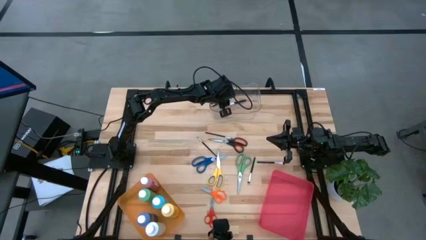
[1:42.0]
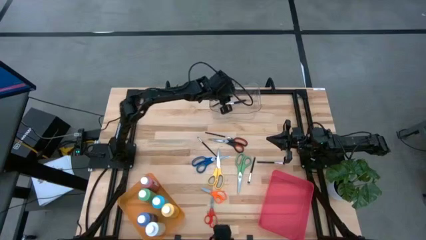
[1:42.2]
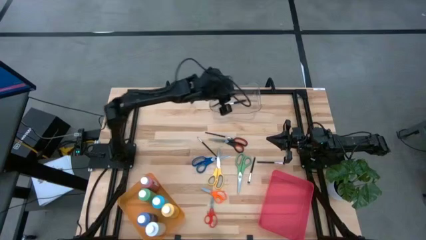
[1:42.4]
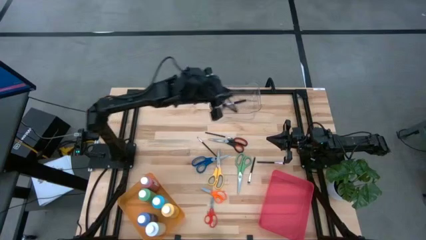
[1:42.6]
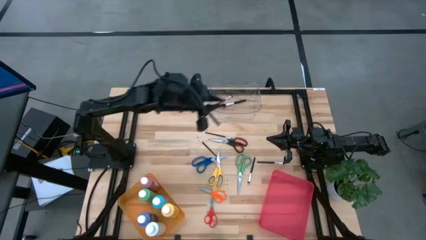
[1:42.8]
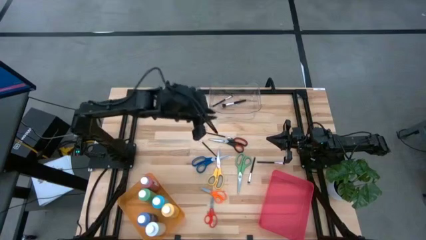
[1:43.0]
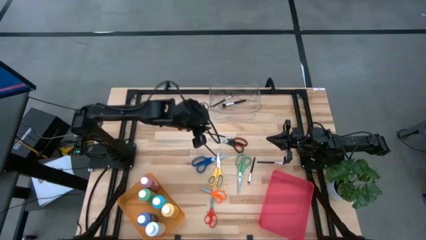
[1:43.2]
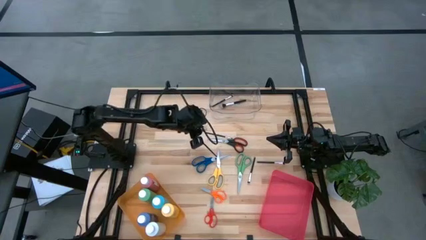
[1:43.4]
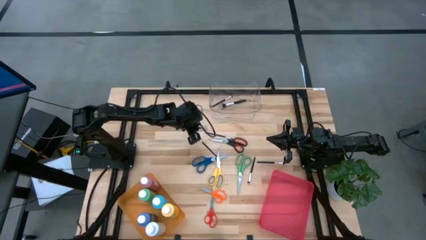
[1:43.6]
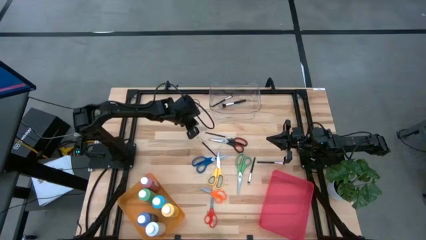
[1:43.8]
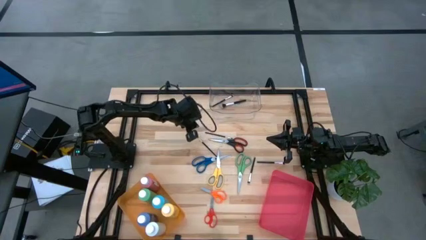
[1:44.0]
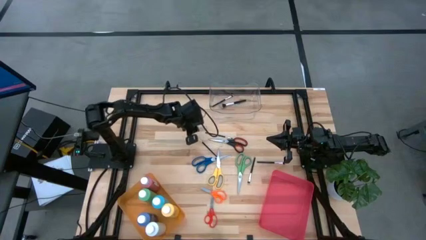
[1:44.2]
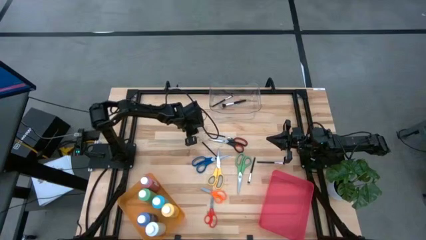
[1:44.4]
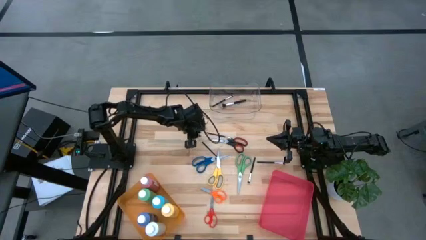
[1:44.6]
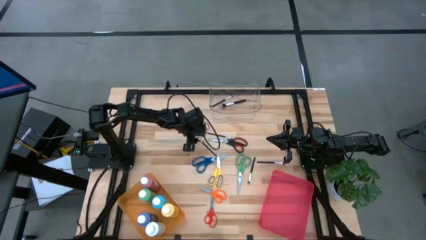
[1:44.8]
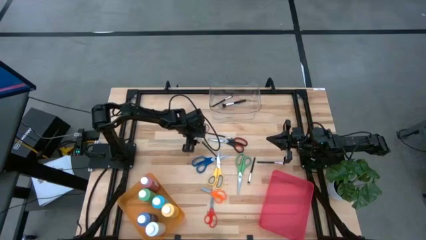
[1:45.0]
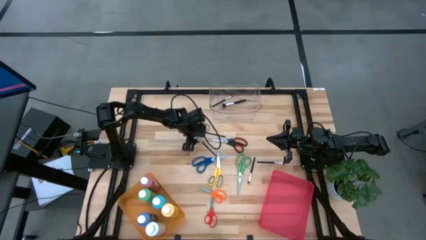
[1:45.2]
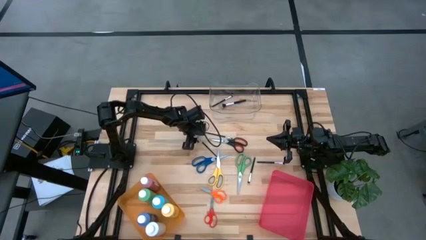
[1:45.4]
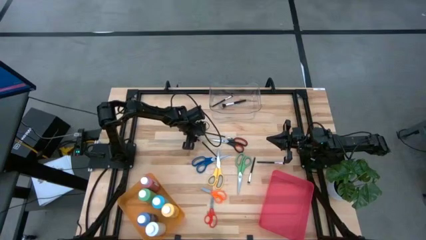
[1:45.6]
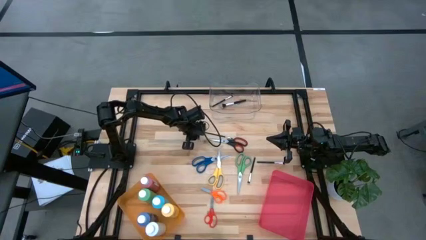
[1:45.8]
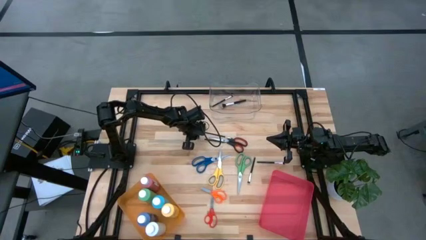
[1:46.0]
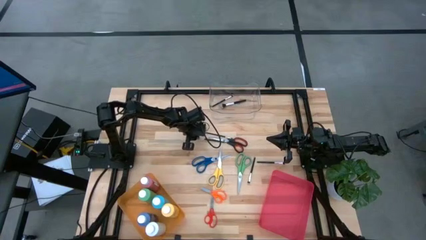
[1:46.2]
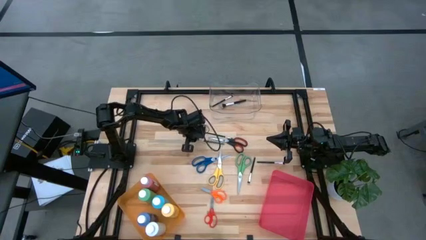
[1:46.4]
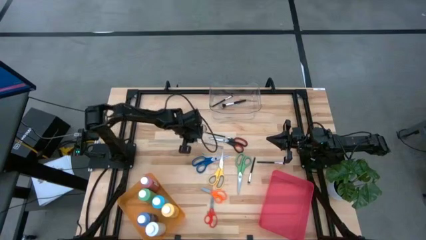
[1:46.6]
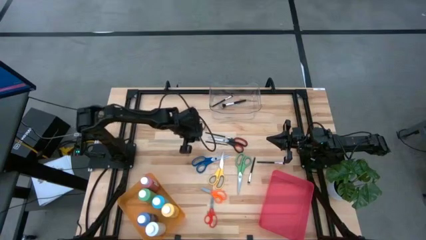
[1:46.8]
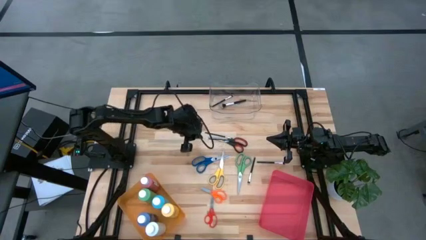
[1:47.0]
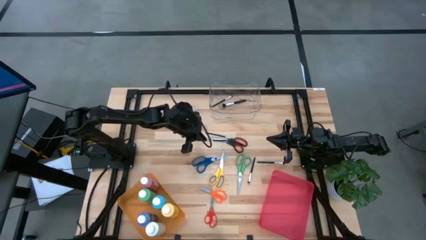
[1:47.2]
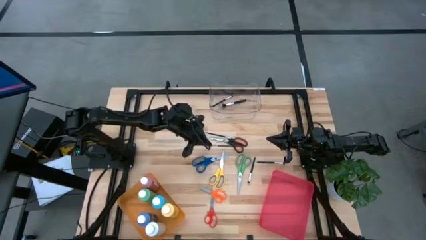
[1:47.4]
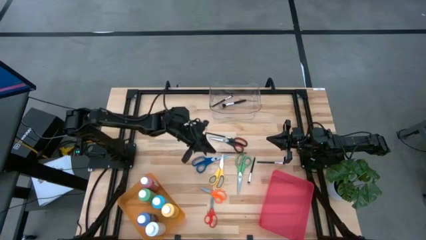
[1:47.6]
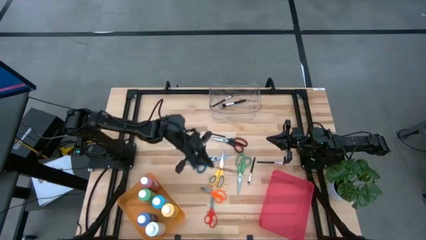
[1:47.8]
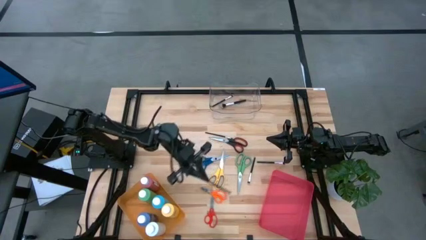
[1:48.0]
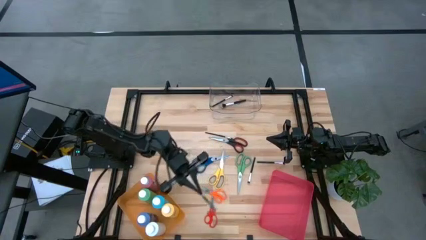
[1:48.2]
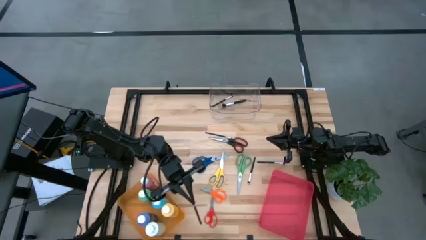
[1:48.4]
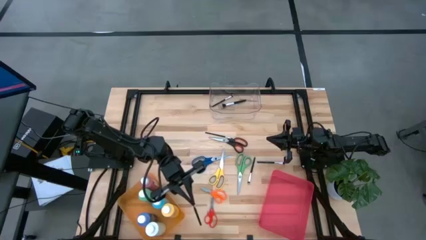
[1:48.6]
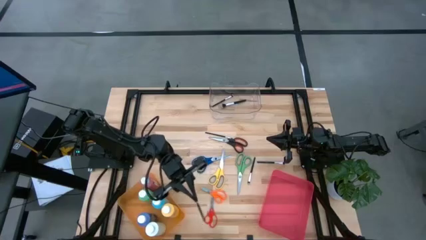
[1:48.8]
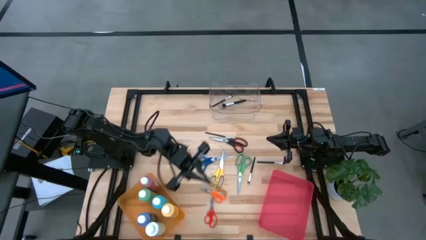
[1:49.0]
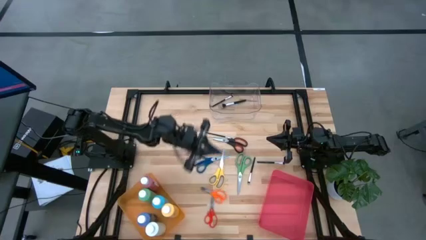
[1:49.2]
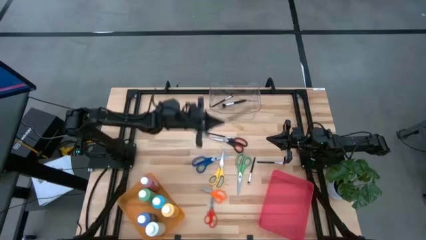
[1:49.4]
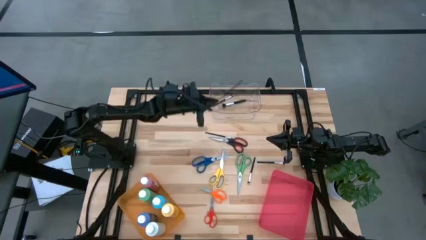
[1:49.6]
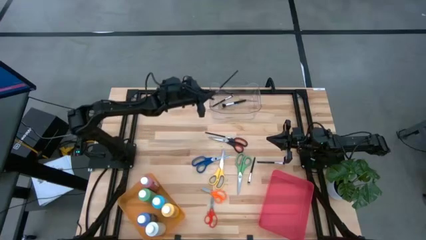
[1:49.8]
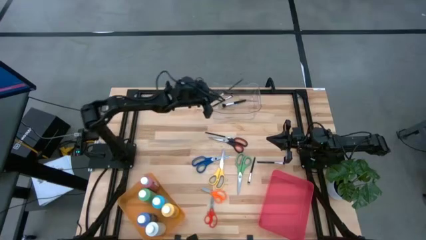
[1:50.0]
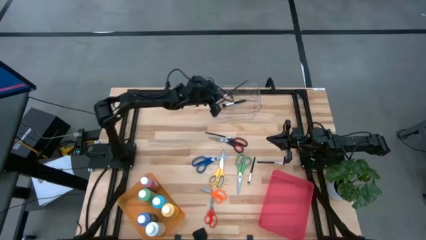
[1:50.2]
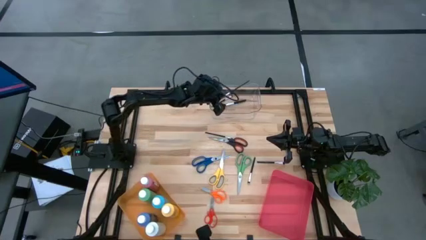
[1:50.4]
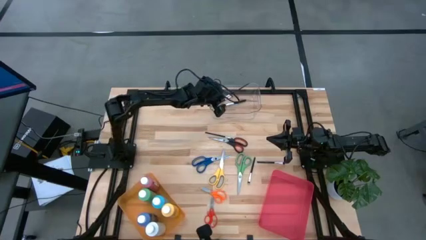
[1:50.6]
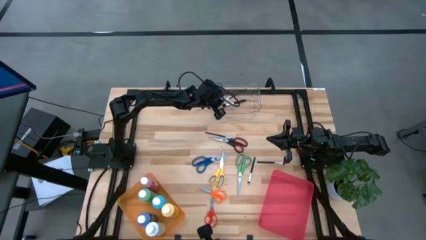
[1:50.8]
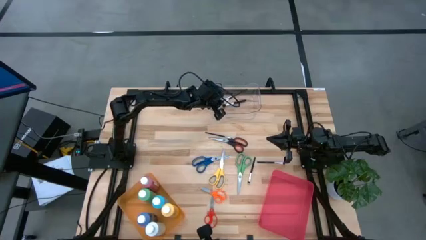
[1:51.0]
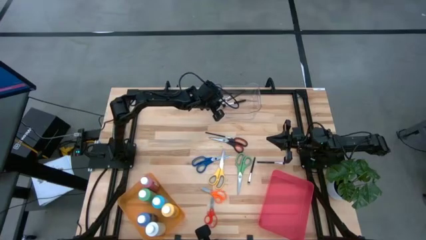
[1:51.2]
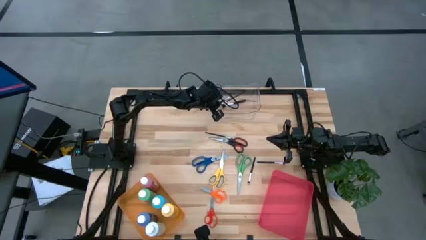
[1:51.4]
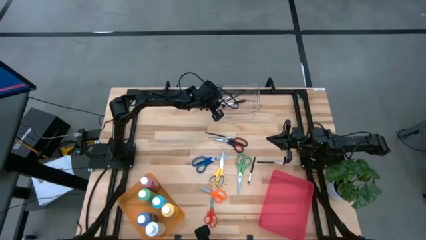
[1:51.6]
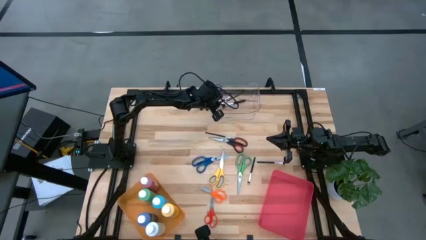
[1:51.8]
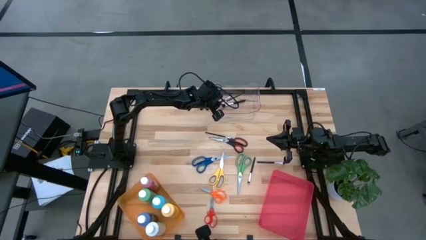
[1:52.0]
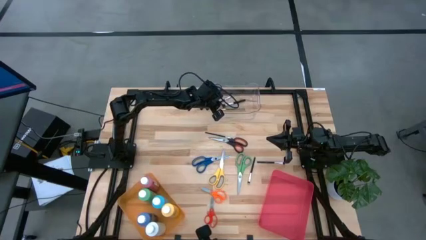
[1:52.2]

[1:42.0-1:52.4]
Task: Pick & Place Paint Supplies
Put the eyeshadow brush into the transparent bin

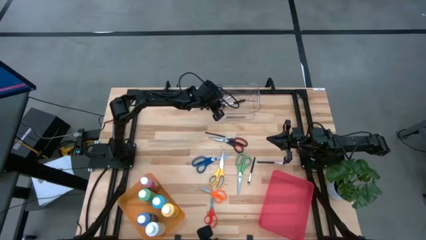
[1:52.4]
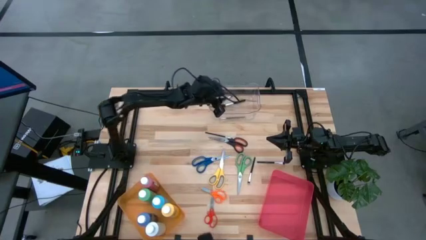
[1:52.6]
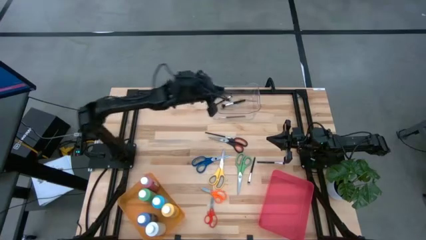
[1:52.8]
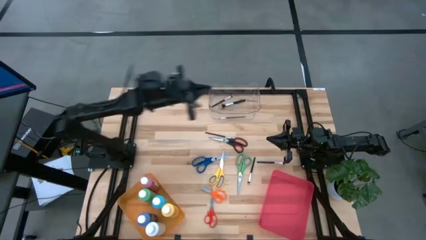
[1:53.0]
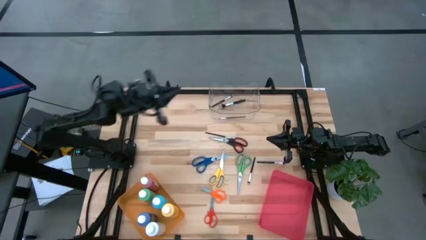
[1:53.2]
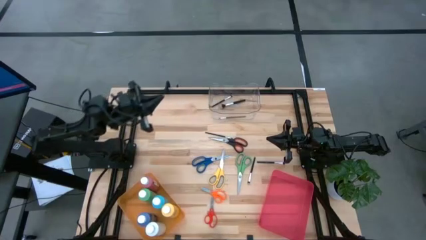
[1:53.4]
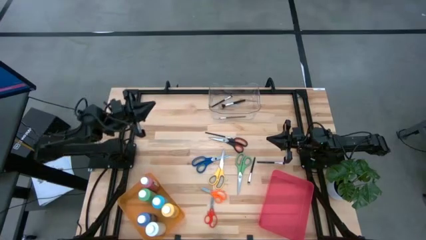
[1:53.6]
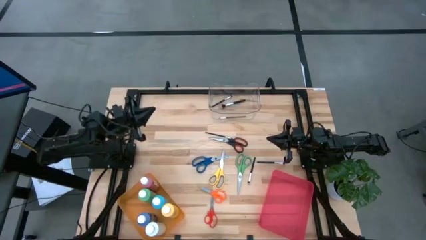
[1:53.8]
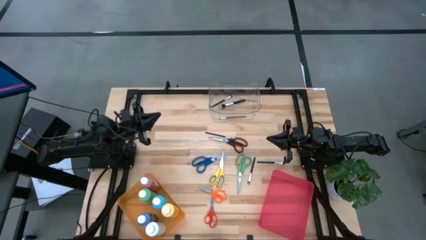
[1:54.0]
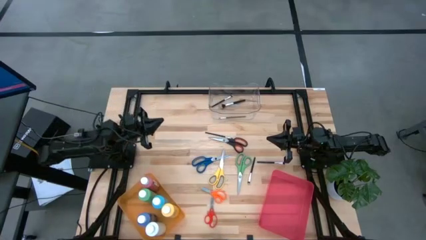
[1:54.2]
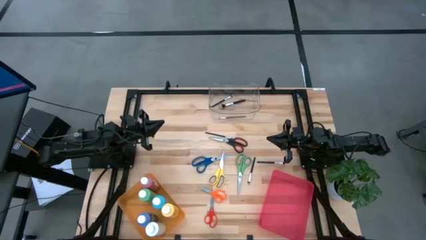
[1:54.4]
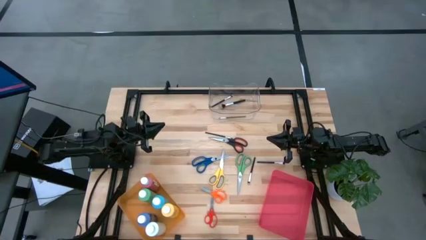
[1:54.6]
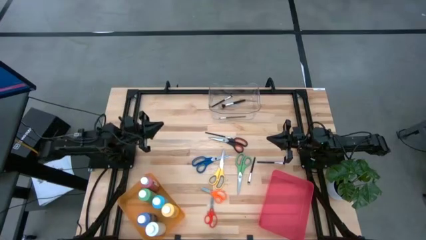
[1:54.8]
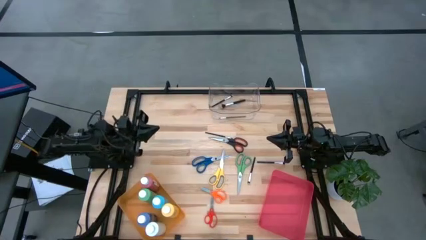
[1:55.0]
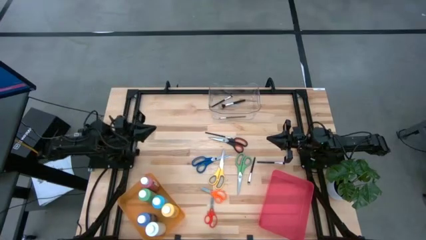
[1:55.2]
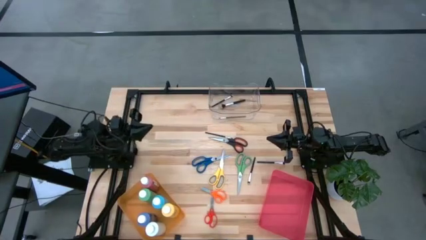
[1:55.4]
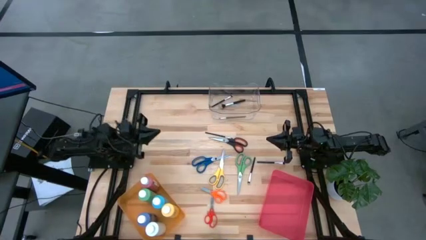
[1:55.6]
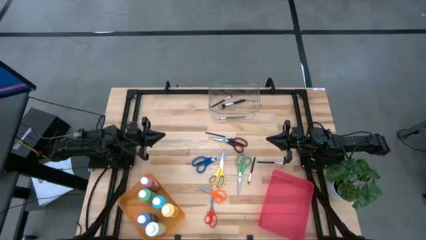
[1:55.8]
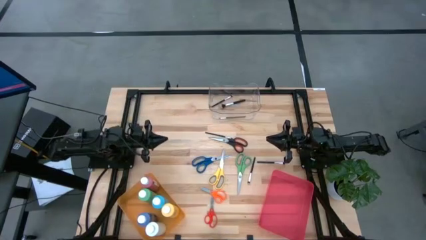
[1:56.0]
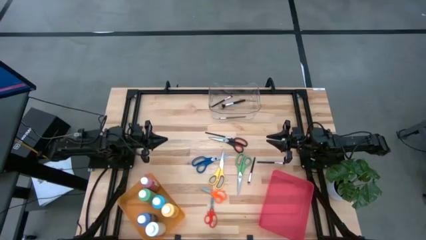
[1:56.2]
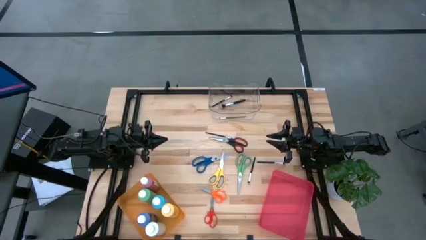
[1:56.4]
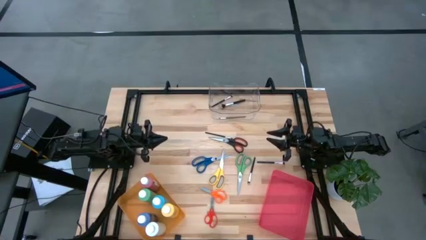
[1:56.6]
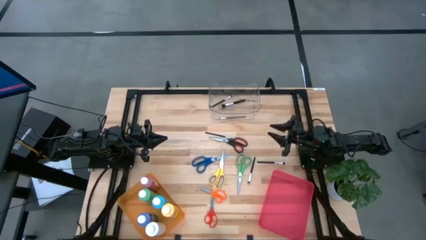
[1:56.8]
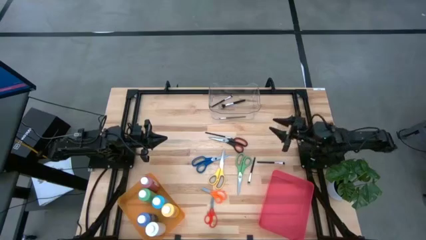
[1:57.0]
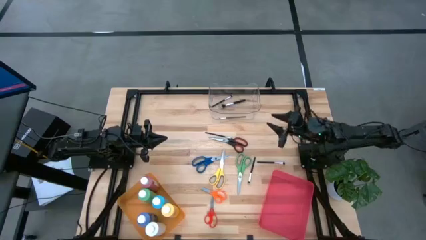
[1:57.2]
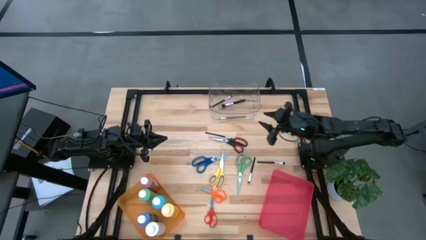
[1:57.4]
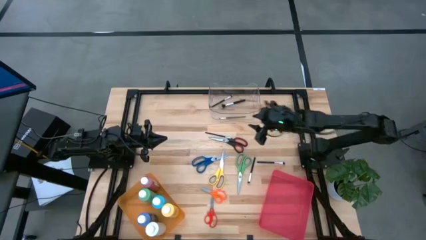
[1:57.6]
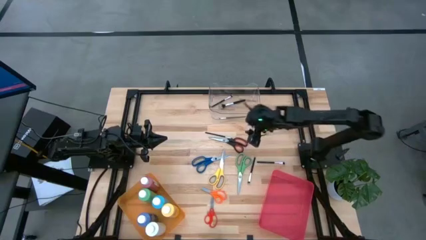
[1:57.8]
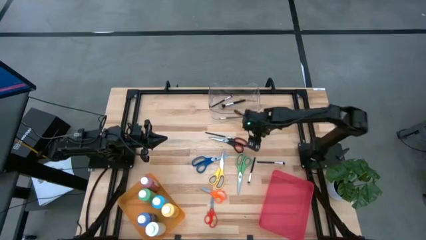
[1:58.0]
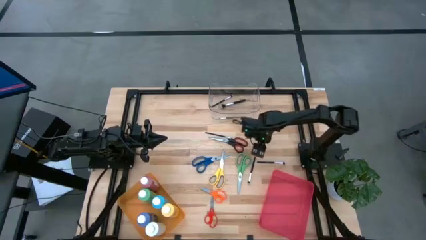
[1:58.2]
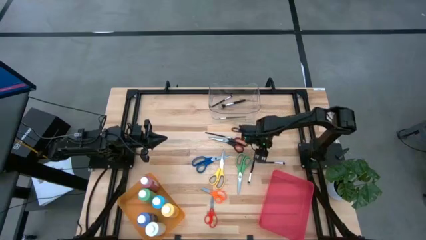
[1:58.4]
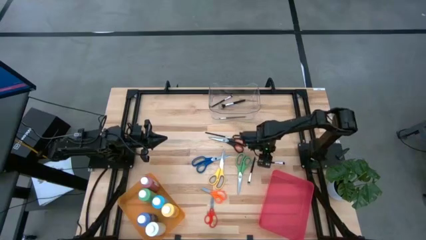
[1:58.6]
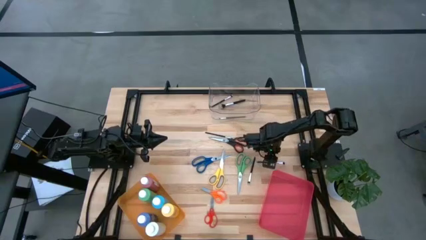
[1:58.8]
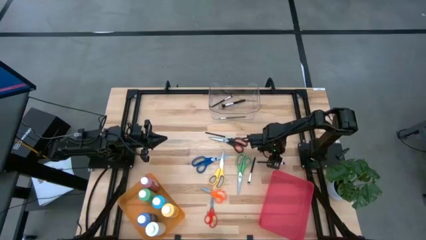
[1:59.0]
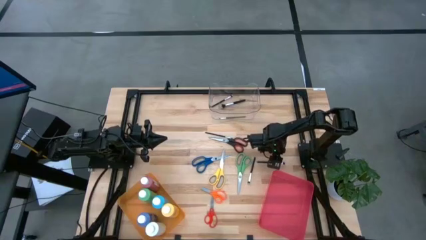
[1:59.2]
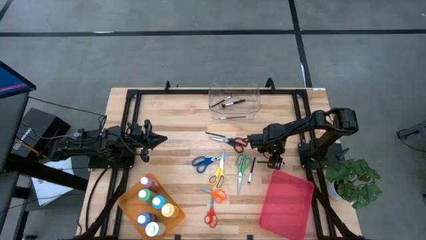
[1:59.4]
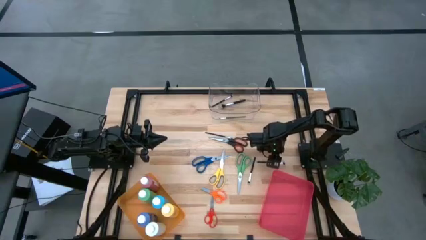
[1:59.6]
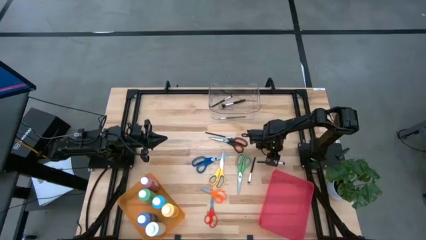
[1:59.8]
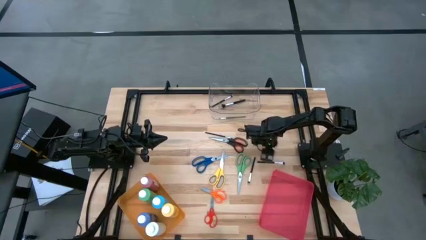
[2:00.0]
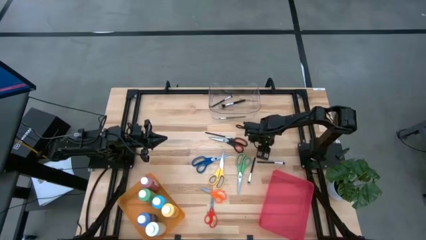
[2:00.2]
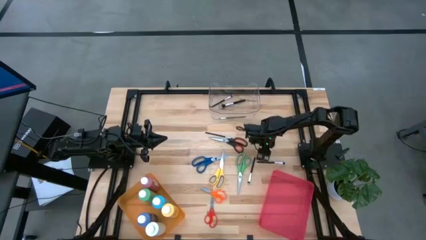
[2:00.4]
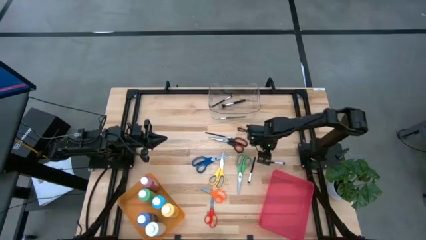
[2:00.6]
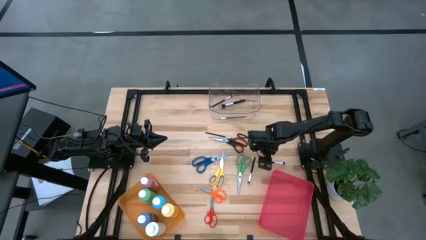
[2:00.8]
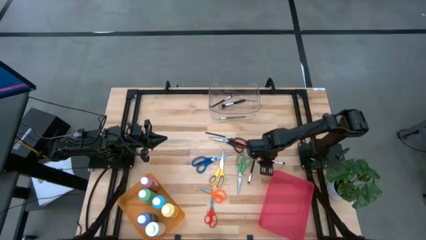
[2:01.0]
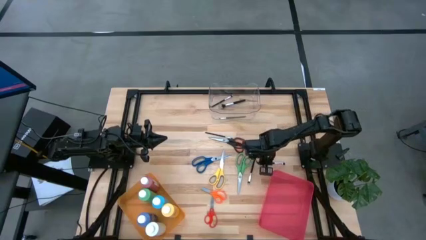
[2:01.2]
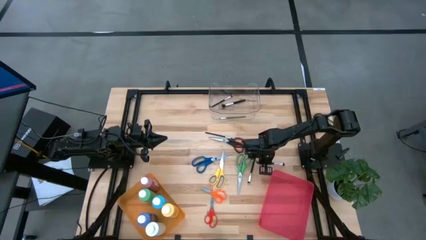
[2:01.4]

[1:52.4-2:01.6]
Put the eyeshadow brush into the transparent bin
